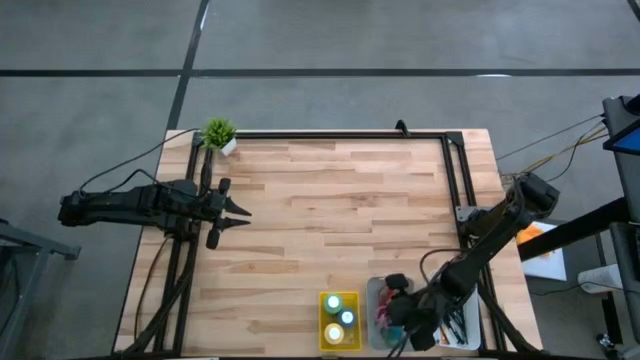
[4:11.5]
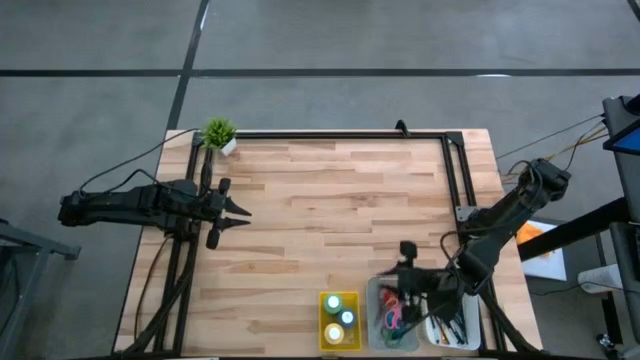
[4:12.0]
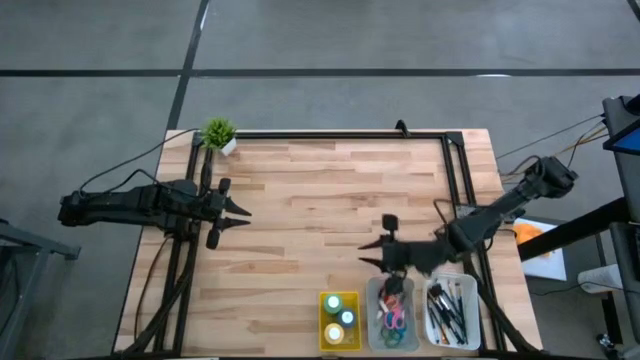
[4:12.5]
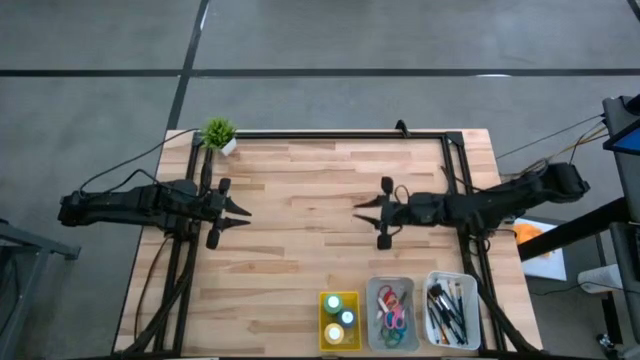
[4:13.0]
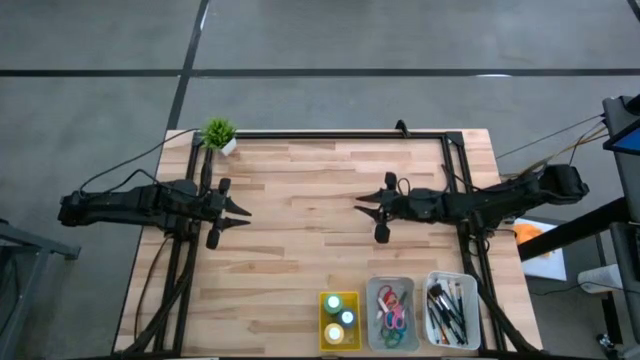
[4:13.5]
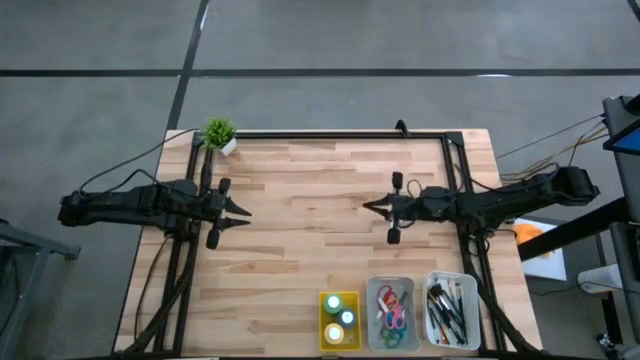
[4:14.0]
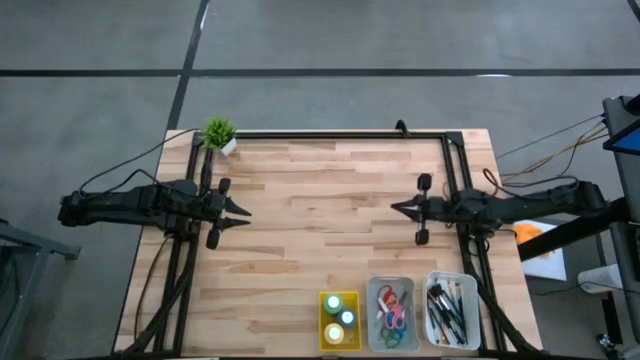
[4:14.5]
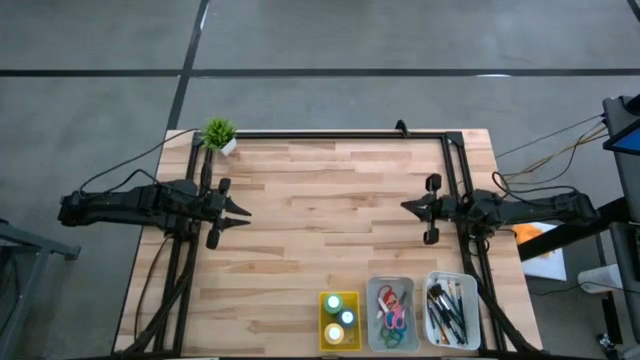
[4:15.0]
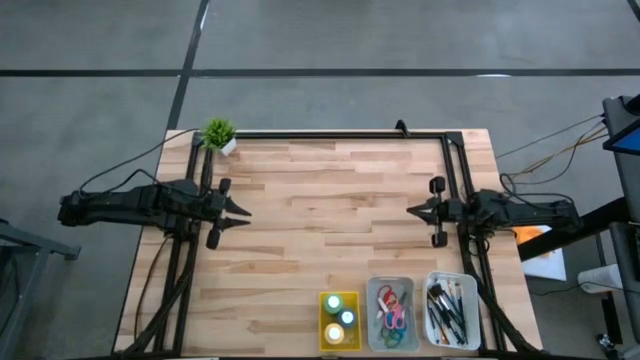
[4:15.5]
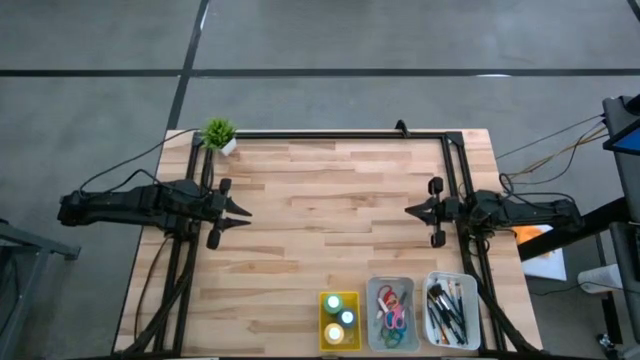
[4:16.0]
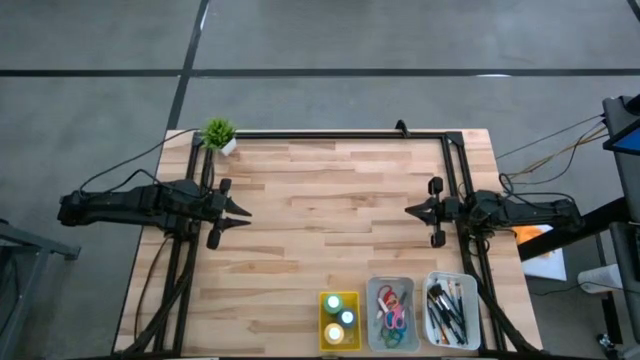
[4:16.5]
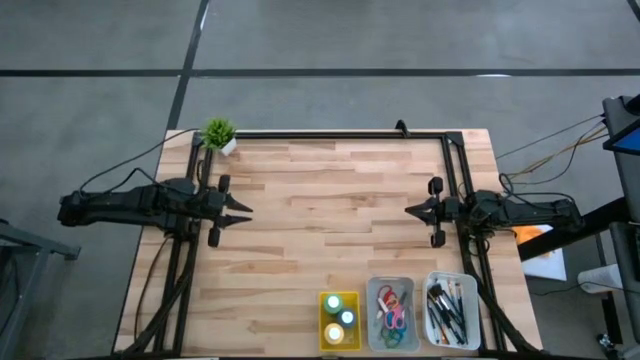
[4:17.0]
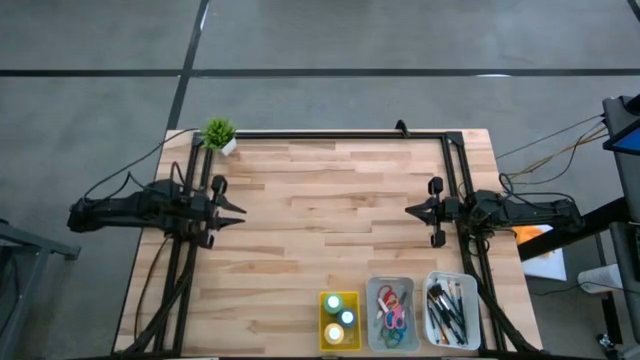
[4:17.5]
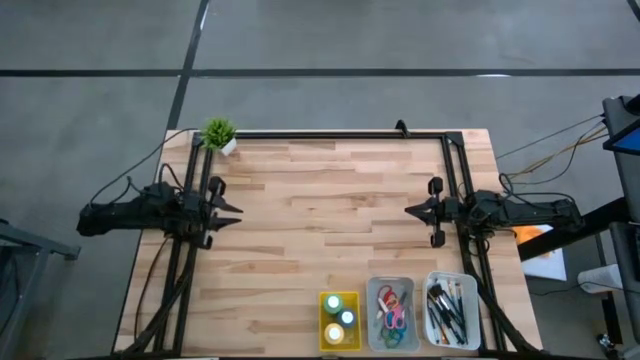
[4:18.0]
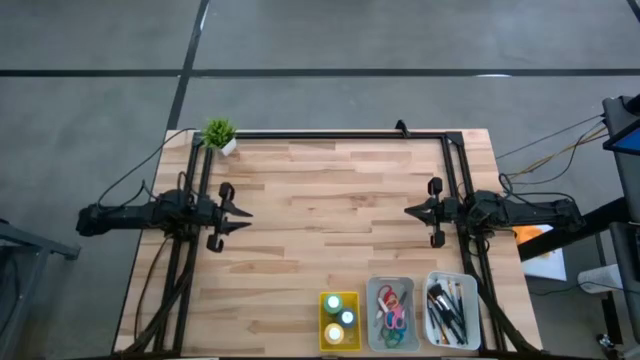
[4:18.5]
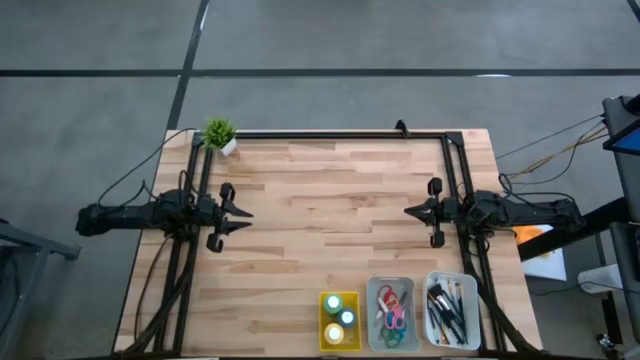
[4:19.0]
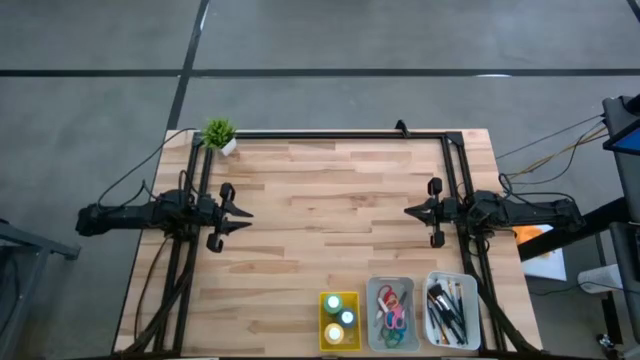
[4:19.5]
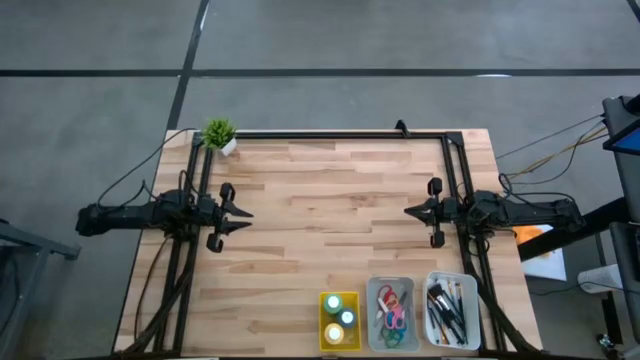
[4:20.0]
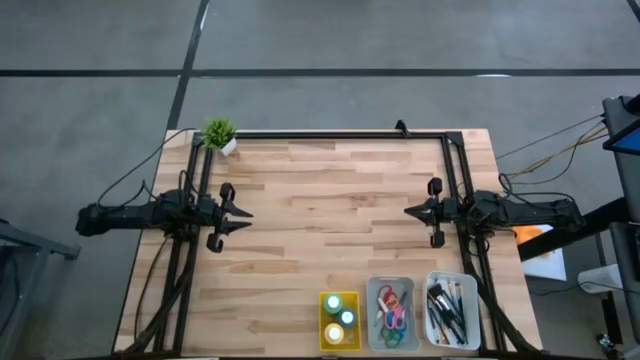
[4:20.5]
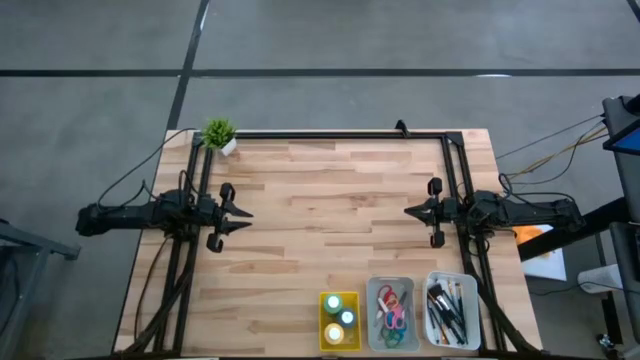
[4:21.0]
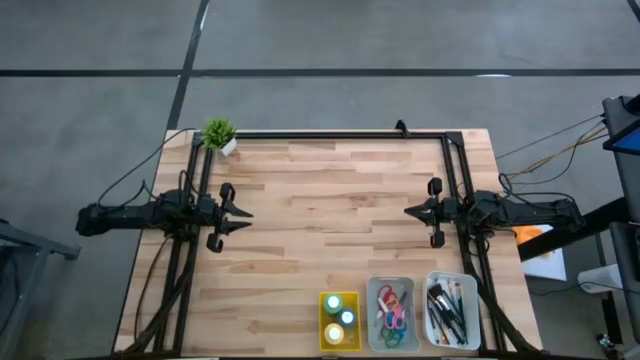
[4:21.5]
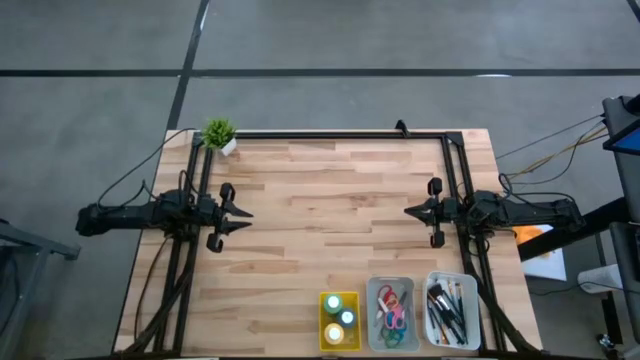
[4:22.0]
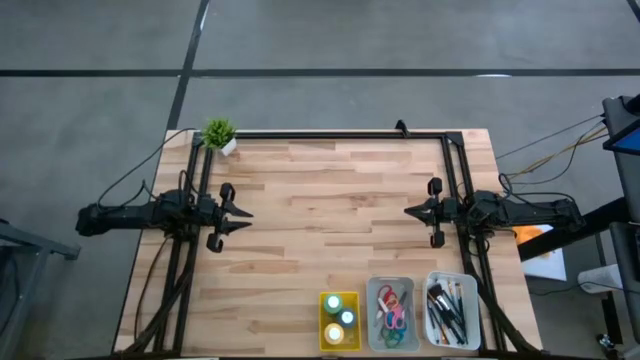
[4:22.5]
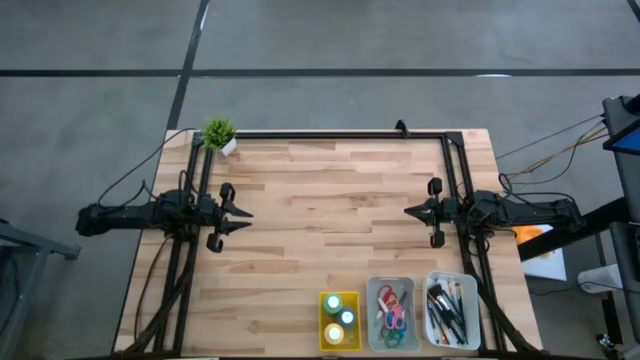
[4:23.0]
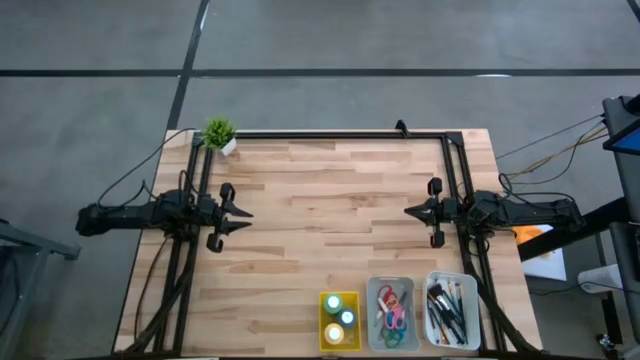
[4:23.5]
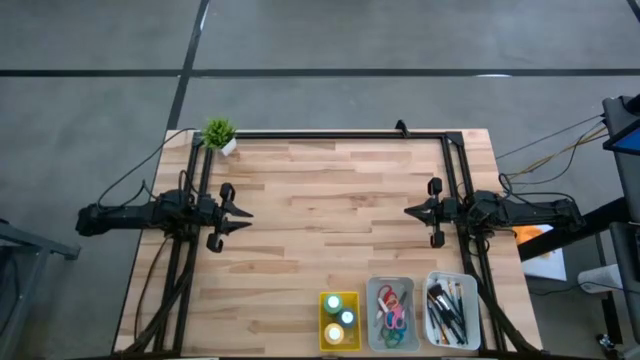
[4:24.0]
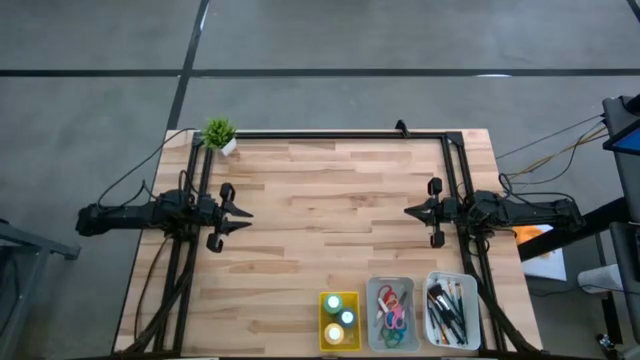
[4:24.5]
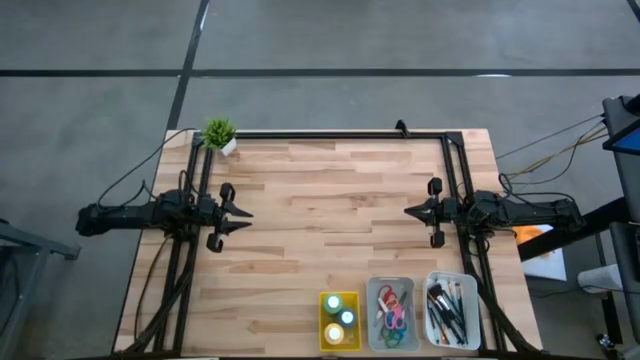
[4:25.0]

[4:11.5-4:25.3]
Task: Pick & Place Paint Supplies
Return to Home Position
